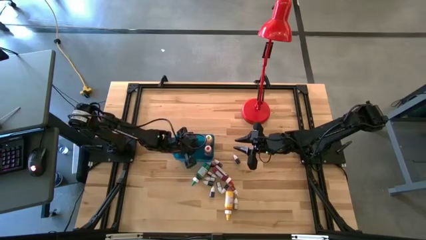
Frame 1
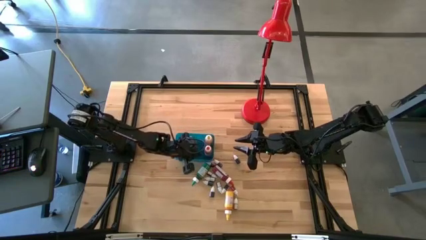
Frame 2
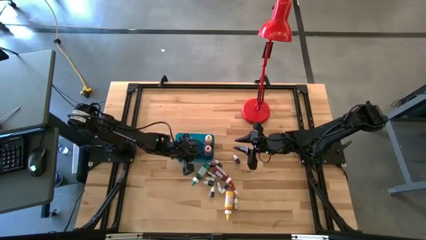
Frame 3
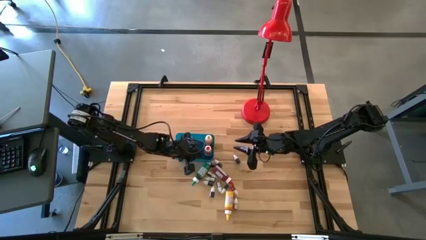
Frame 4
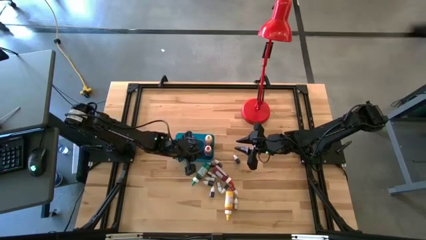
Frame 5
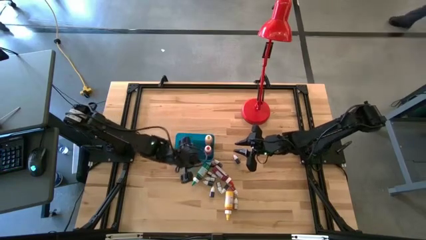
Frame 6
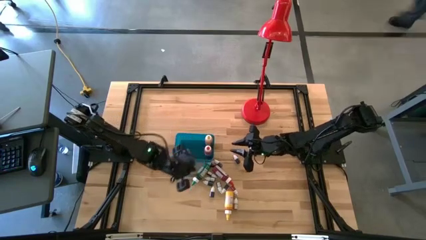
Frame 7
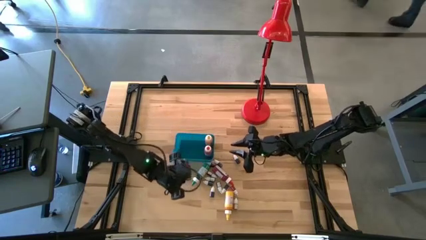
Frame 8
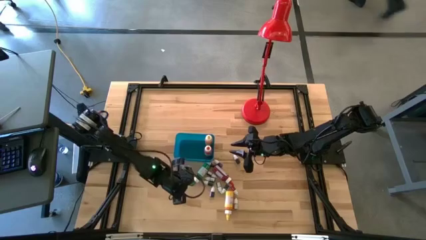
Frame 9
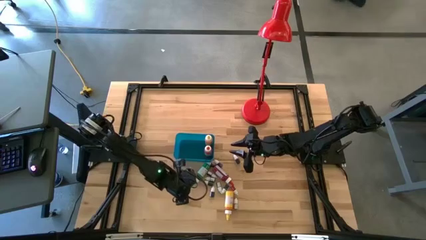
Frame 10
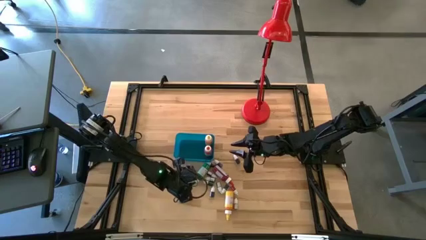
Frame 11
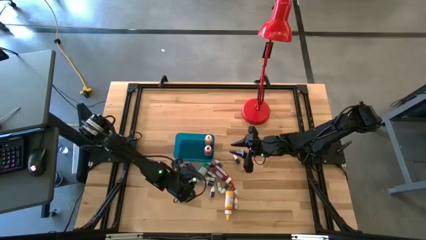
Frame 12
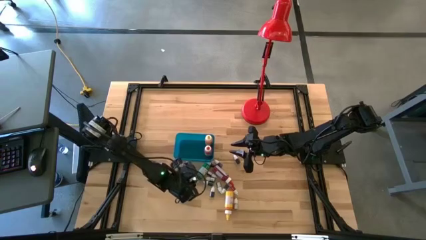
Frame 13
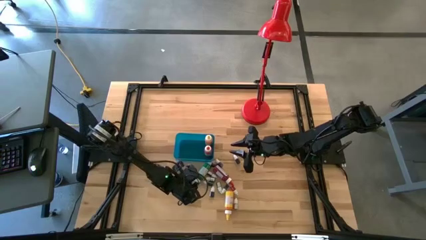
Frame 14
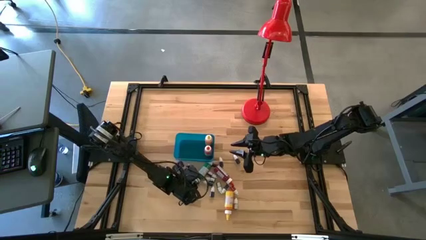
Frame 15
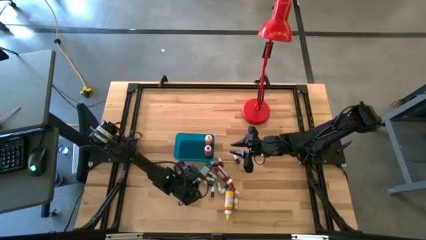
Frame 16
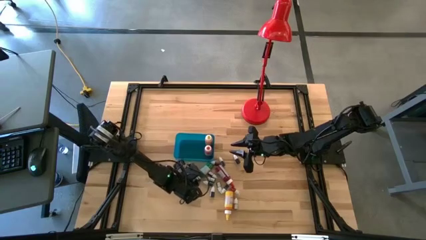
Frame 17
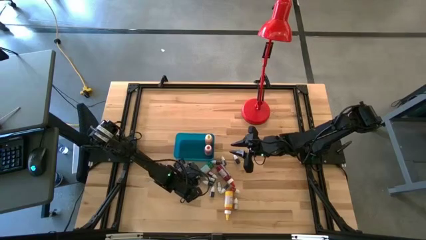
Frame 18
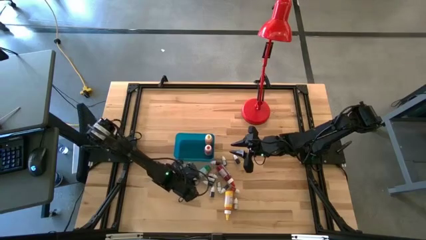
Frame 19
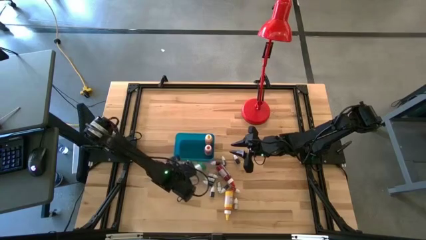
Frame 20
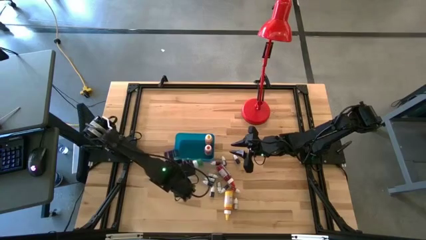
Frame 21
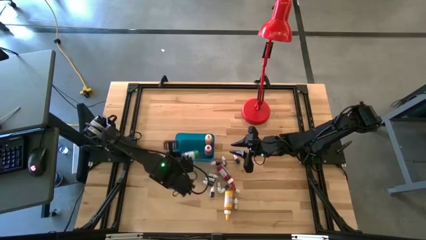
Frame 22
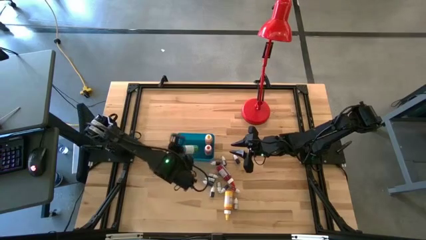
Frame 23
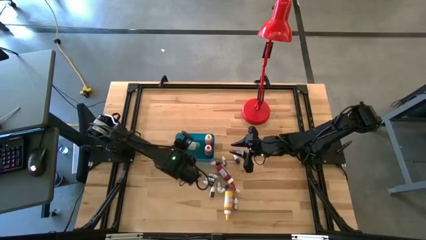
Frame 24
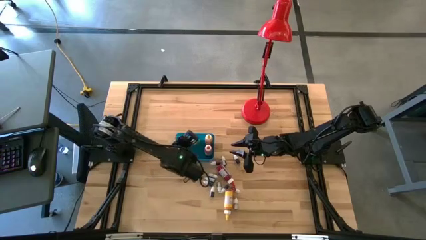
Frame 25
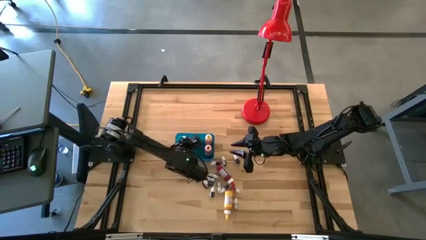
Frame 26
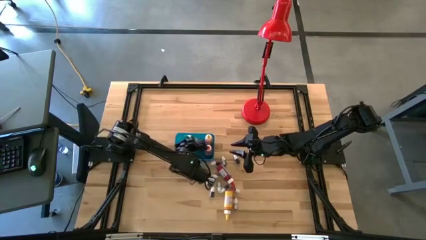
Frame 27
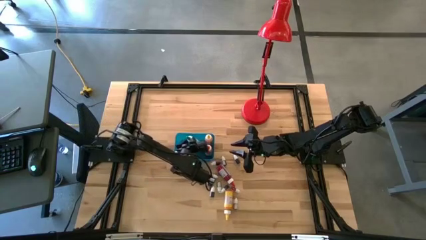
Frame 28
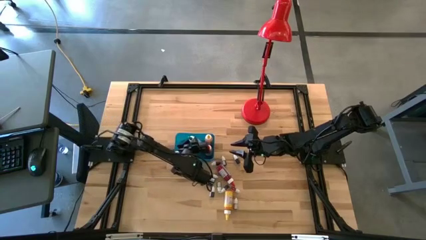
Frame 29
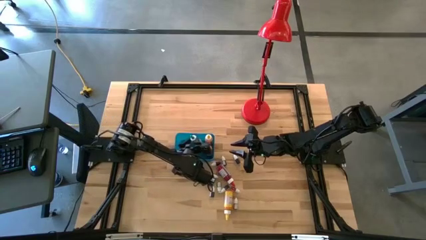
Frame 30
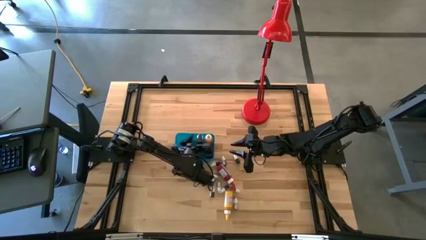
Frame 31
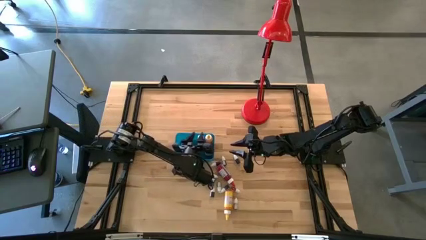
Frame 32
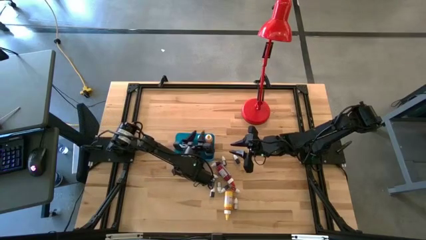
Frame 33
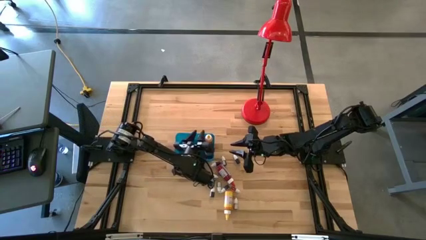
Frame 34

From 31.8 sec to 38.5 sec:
Task: Pick & Place food coloring
Put the large green food coloring into the blue bin

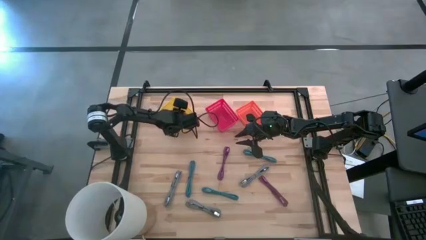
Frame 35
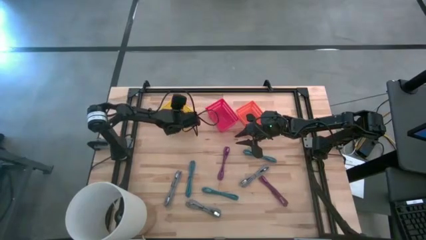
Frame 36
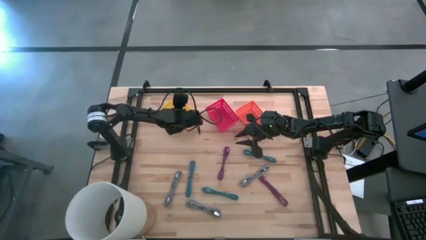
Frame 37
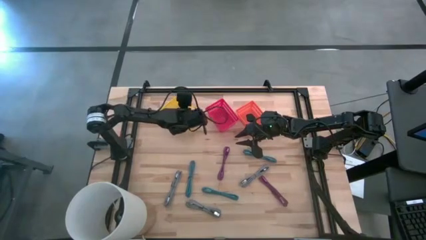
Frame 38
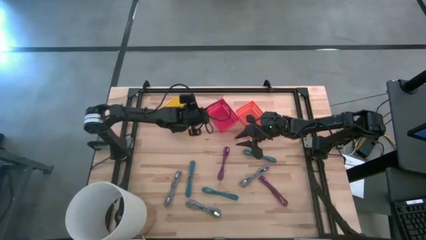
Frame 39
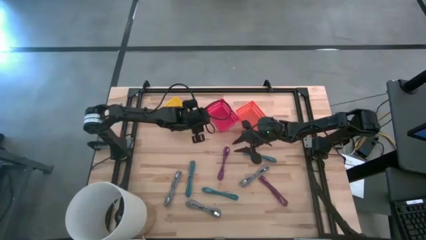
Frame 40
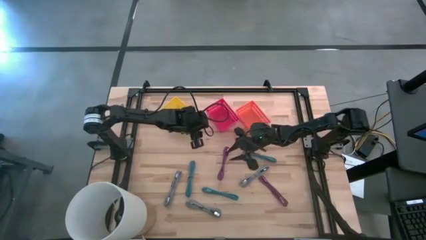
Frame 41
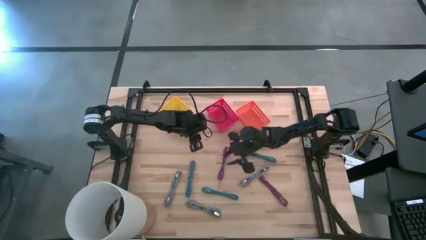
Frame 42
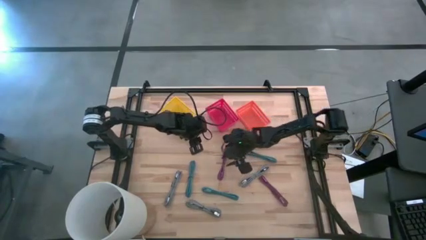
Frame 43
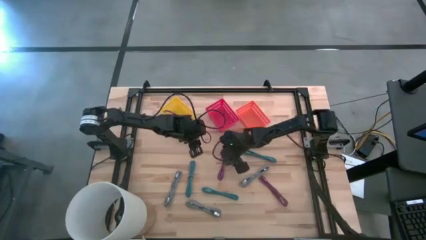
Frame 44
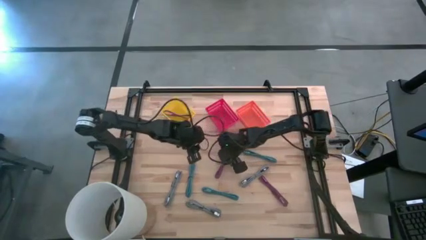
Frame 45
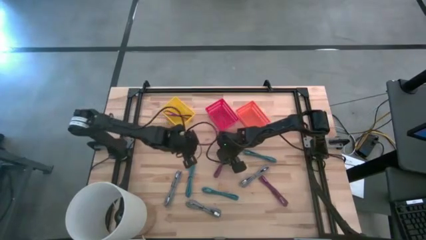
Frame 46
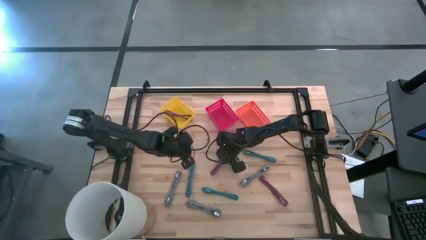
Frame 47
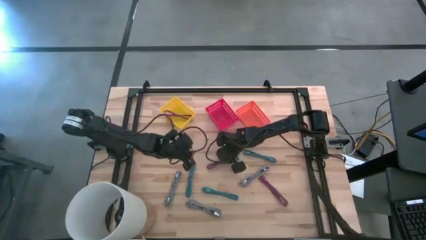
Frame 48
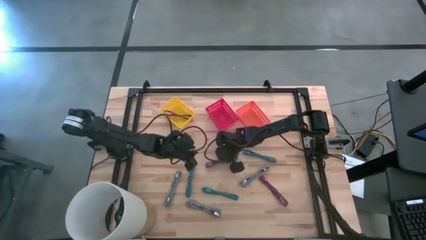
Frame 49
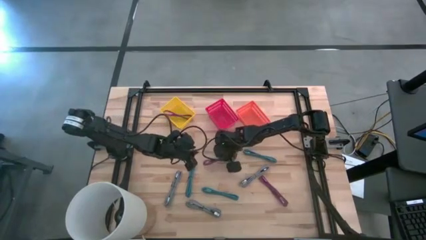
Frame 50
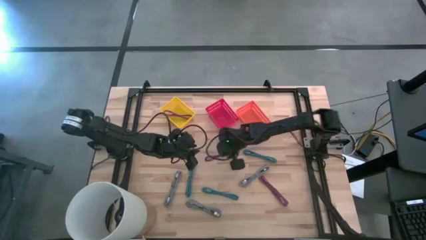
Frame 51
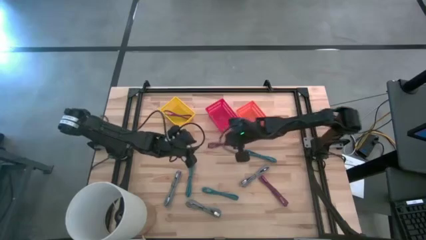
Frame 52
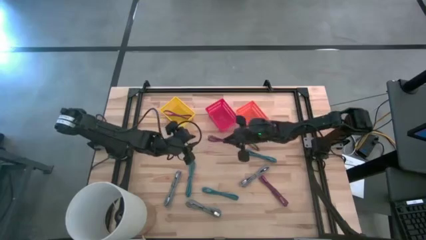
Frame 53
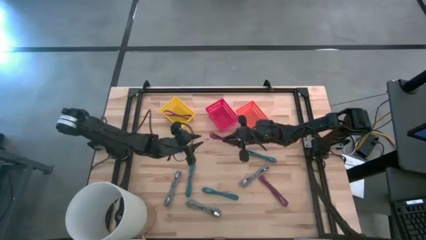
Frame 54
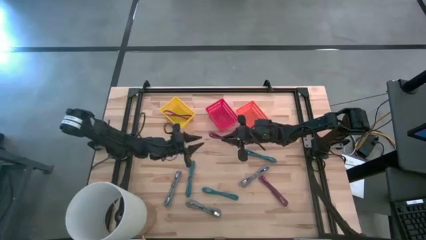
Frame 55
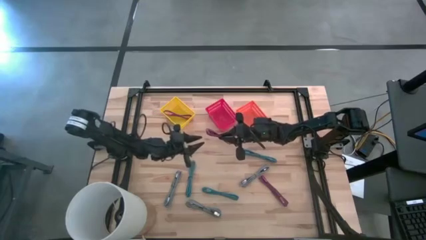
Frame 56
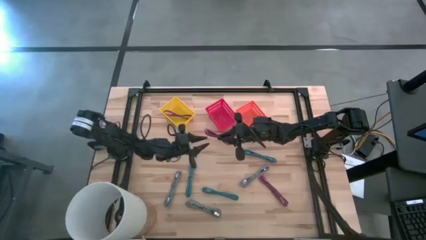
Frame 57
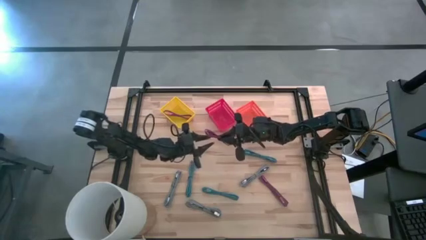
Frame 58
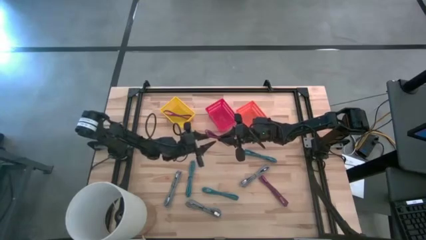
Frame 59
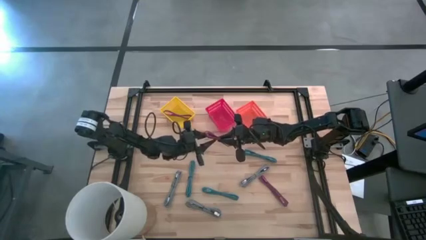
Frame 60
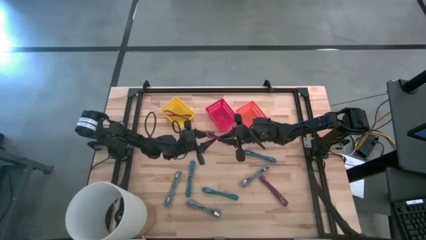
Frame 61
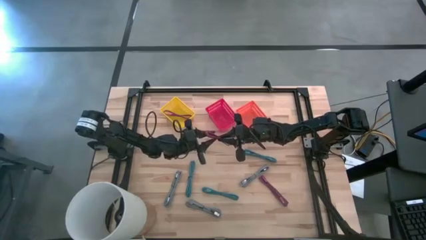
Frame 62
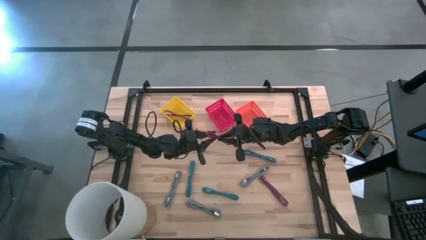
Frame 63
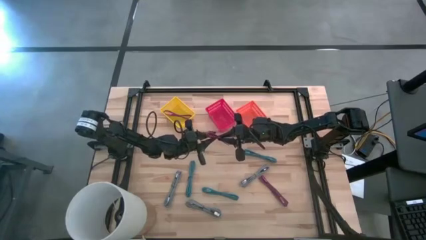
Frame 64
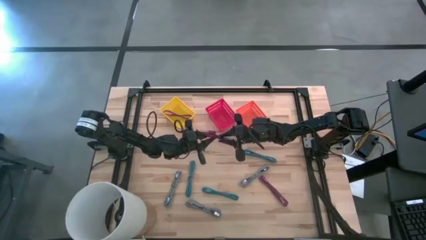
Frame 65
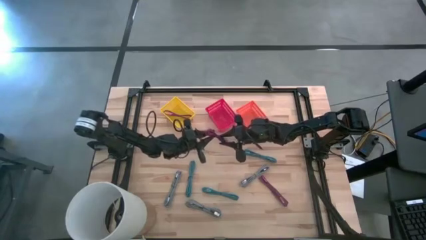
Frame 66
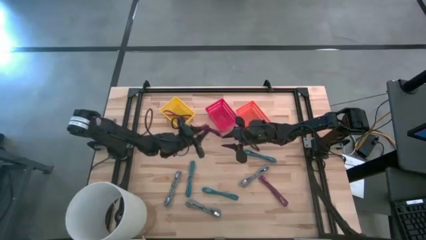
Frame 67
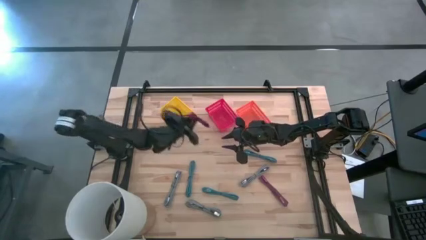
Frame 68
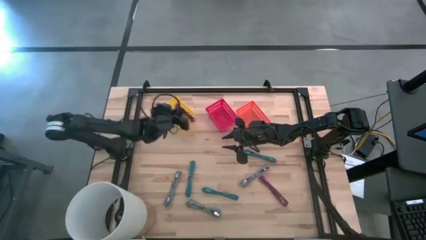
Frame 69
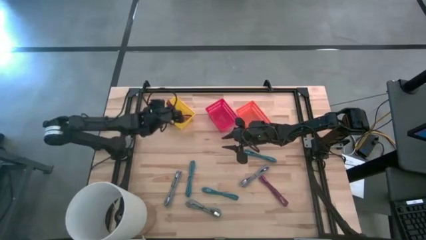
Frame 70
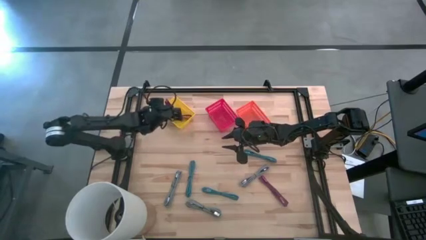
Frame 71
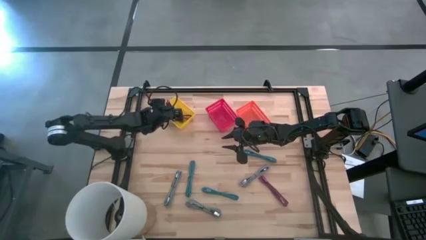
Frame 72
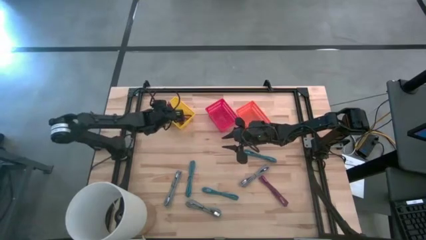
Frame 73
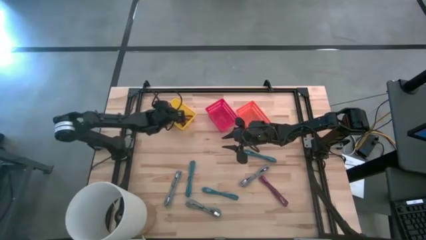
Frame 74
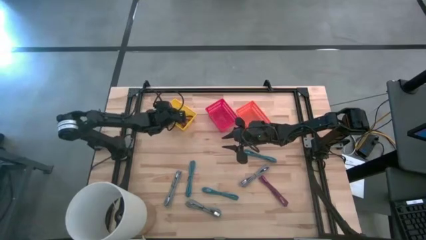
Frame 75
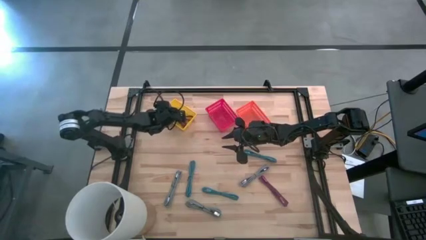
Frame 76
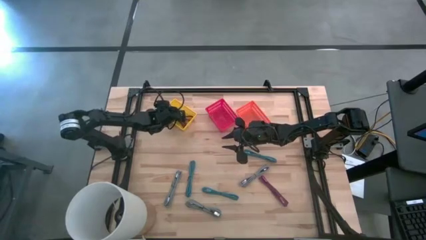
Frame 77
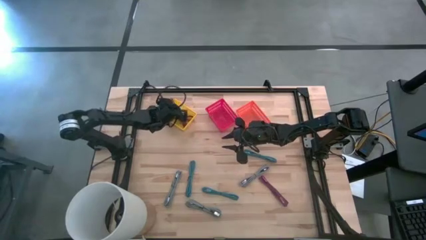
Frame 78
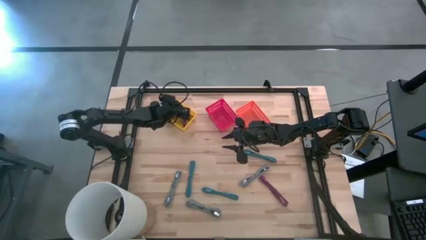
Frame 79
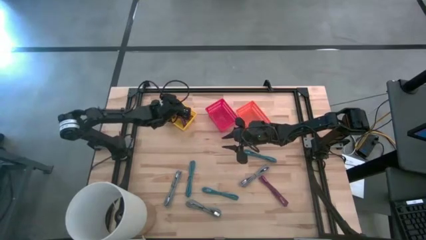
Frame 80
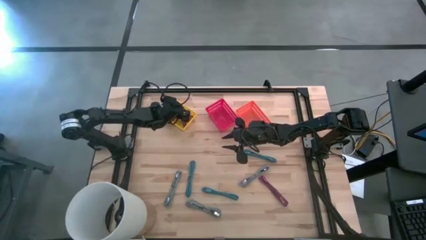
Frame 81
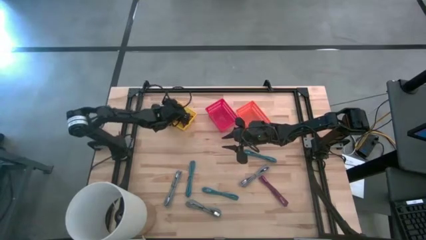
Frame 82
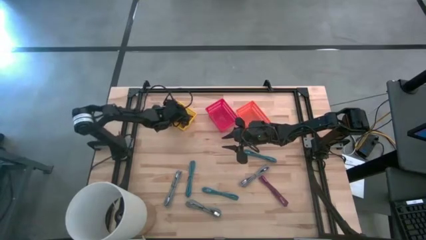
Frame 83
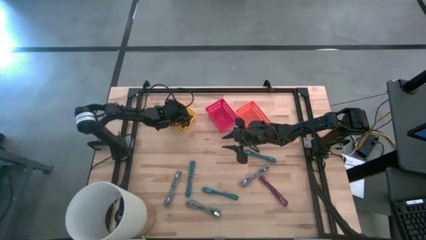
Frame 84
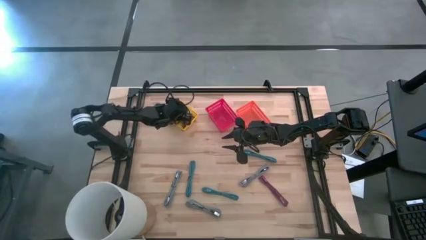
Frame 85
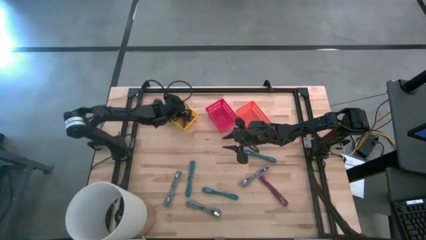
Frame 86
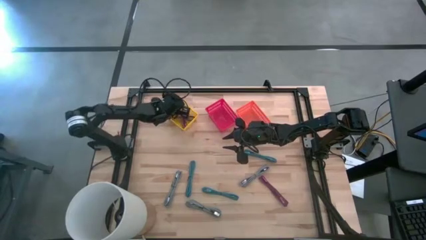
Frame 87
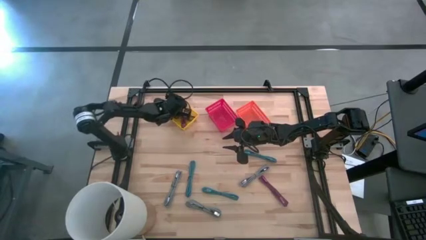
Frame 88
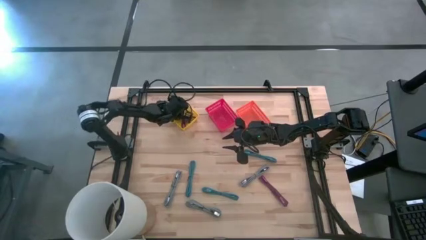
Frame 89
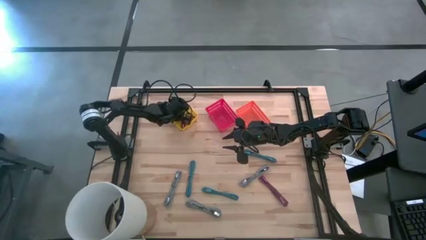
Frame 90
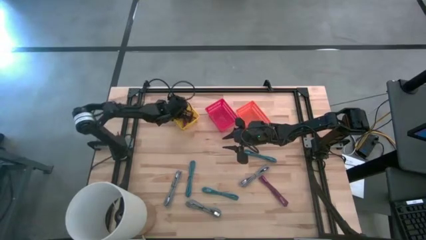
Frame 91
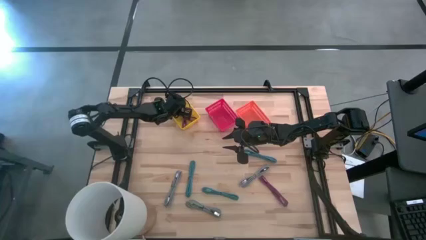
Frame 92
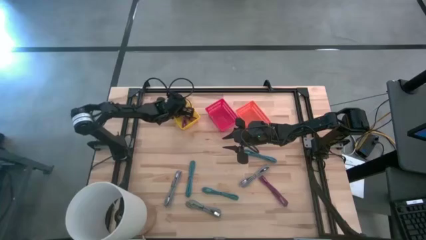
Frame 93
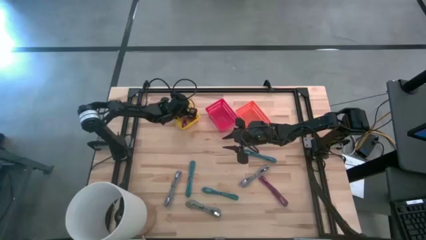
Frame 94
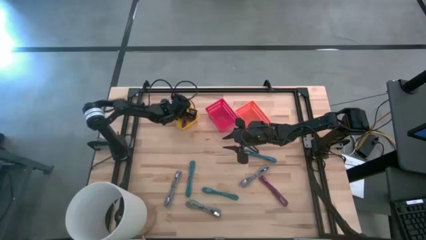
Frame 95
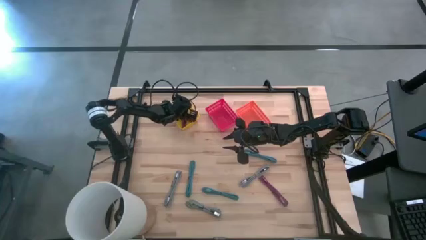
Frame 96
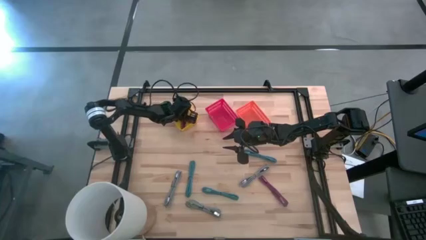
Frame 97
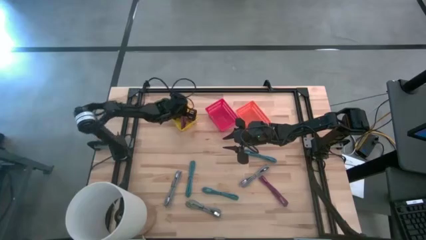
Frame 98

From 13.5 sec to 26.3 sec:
Task: Pick & Place USB Port
Put the top black violet USB cable into the yellow bin
